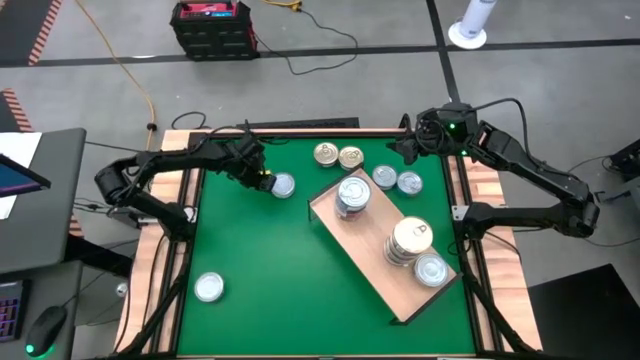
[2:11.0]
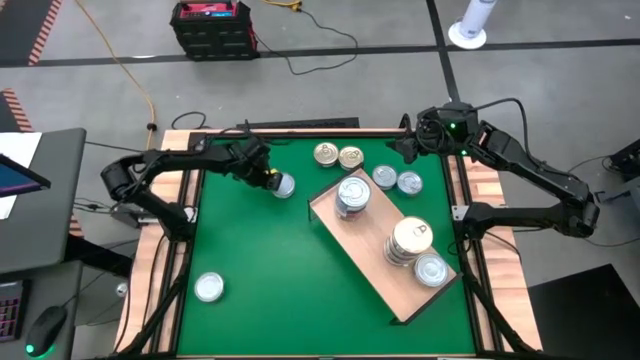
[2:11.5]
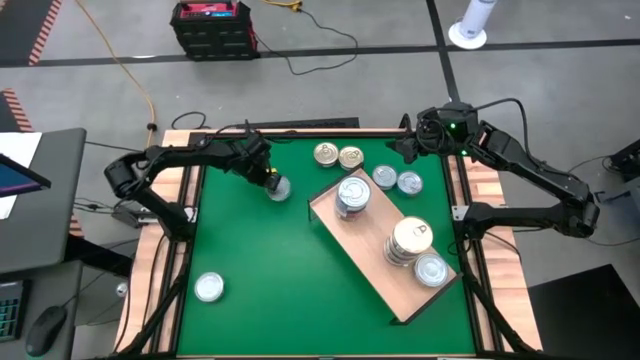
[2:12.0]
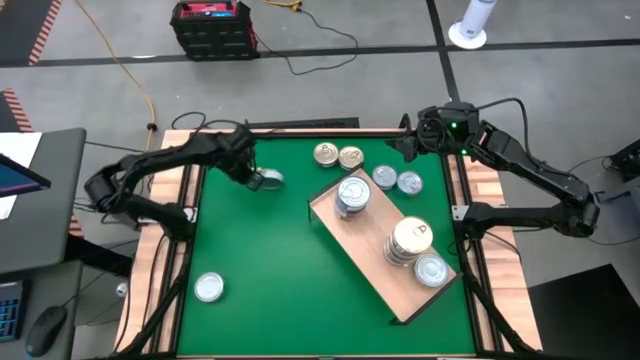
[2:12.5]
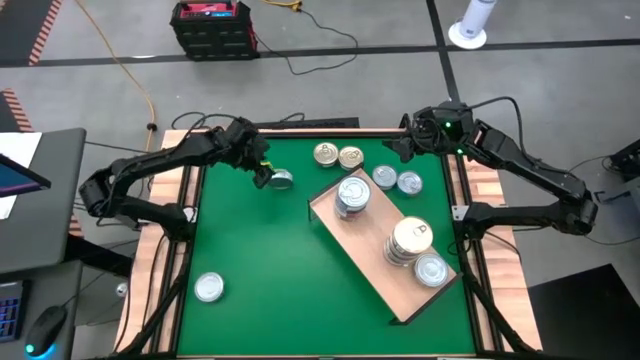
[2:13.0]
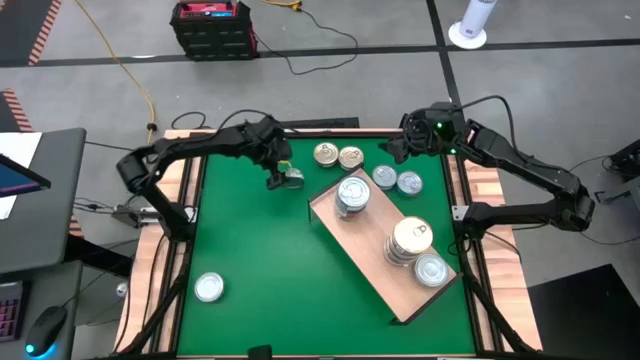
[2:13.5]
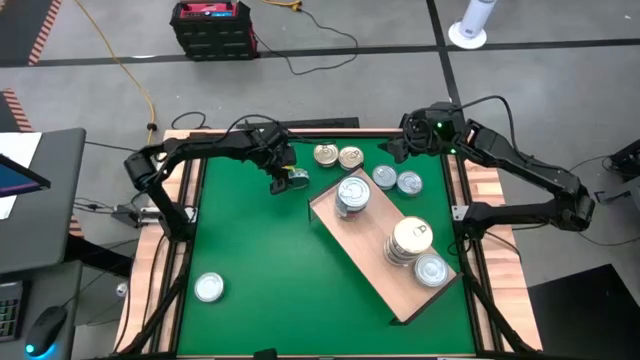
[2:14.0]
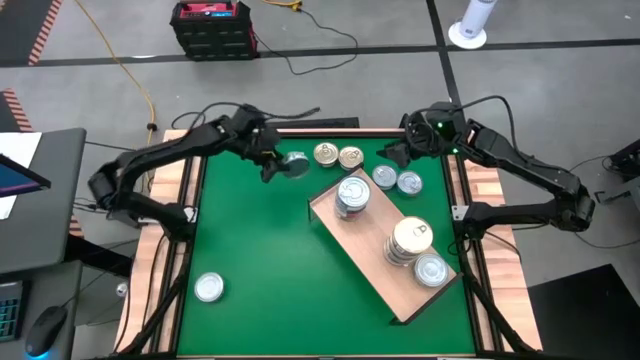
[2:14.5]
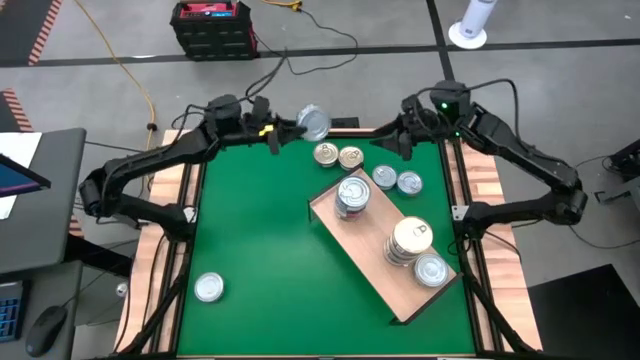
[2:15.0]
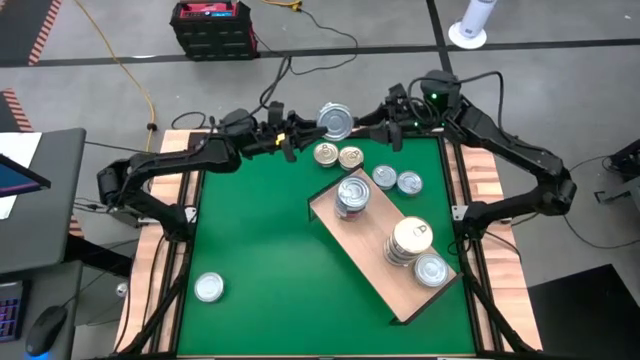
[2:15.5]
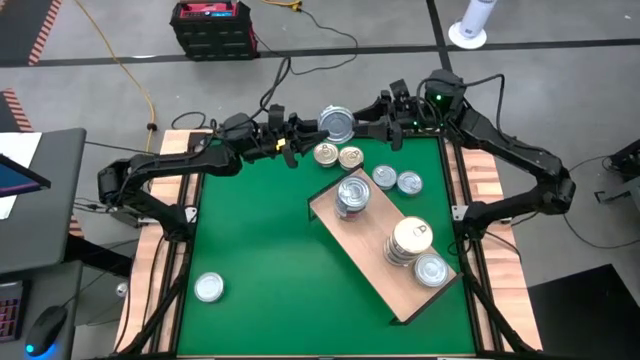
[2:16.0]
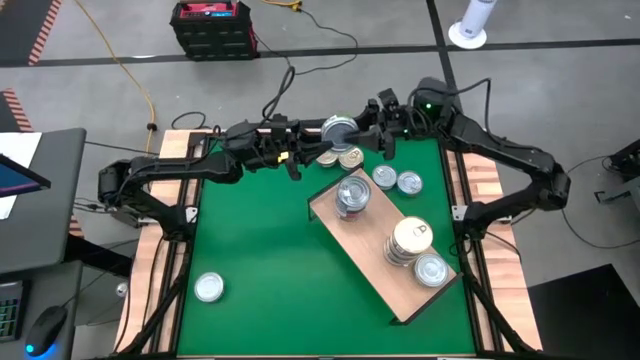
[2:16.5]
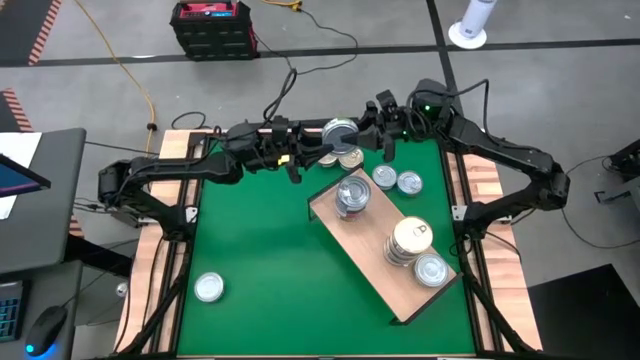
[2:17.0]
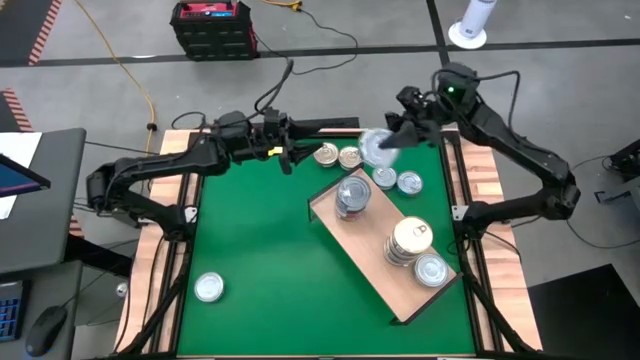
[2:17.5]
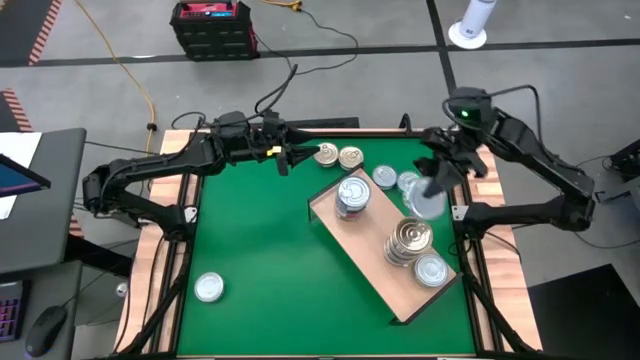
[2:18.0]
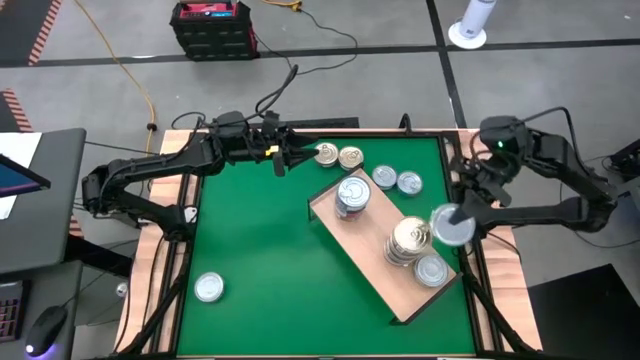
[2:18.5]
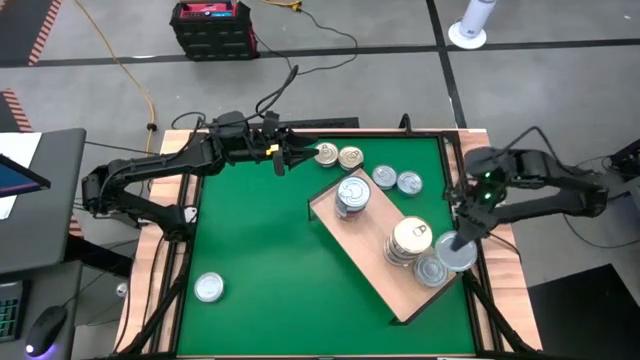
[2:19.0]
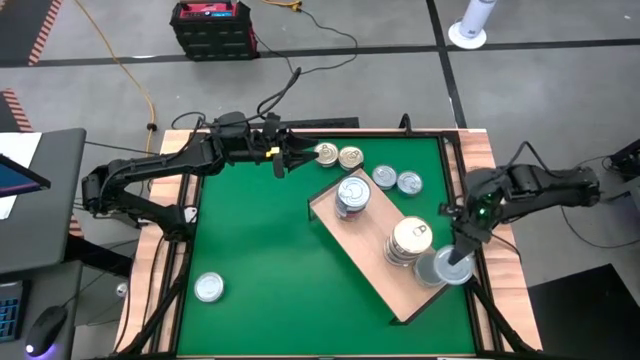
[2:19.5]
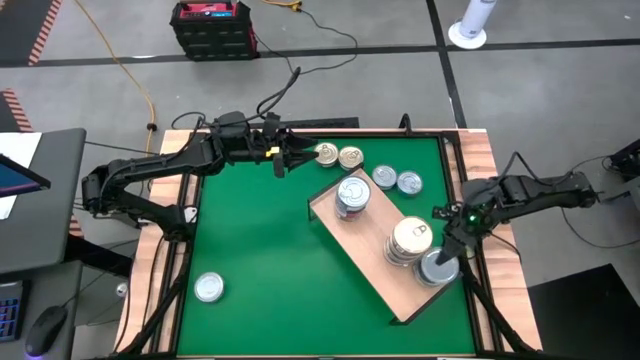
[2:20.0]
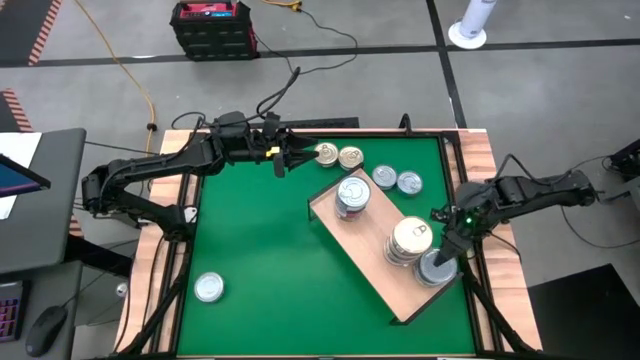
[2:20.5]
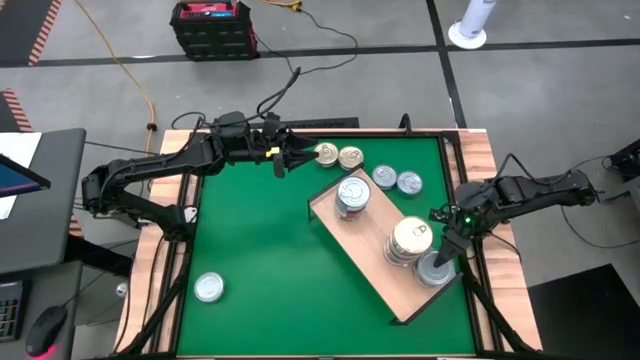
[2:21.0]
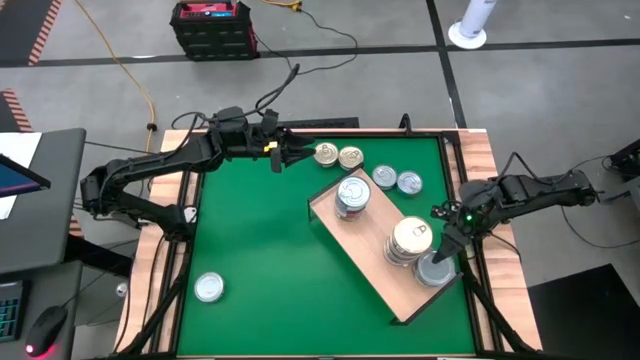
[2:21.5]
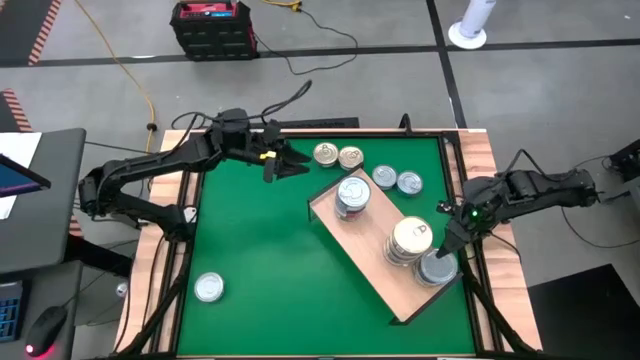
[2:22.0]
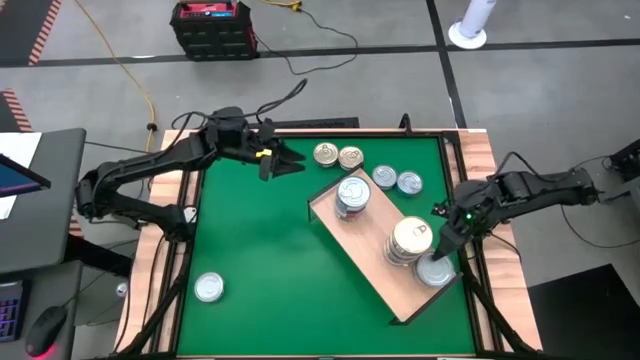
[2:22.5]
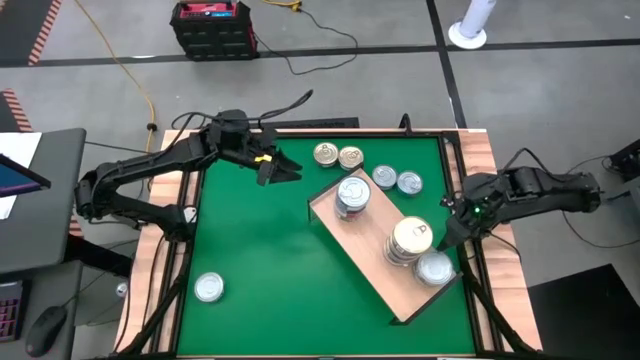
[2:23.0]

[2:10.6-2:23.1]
Task: Stack canned seafood by type on shelf
Stack the light green tuna can on top of the other light green tuna can on the shelf

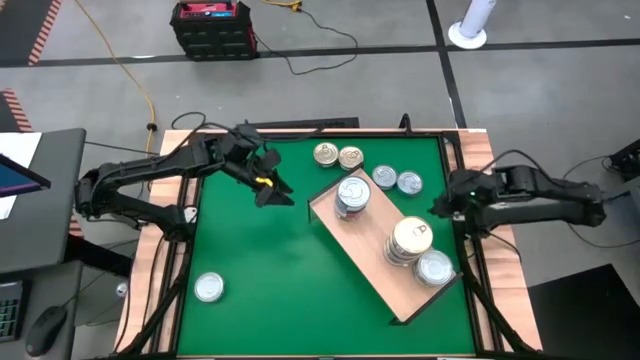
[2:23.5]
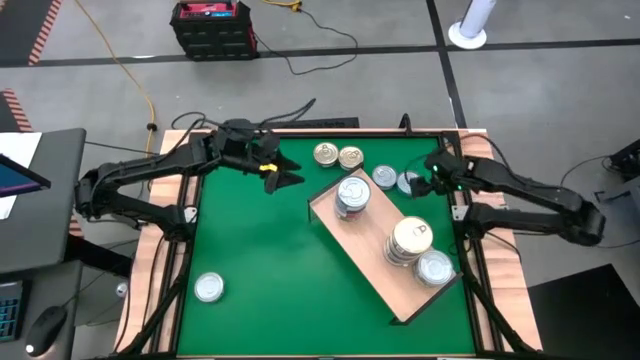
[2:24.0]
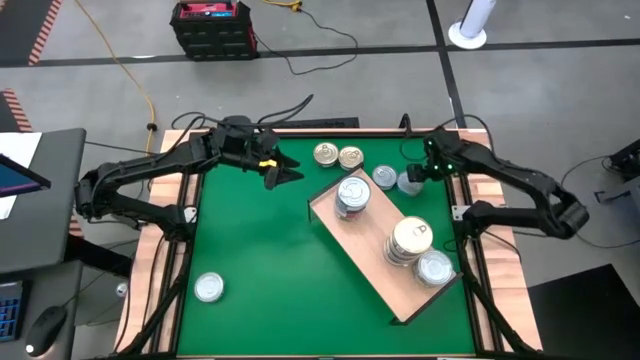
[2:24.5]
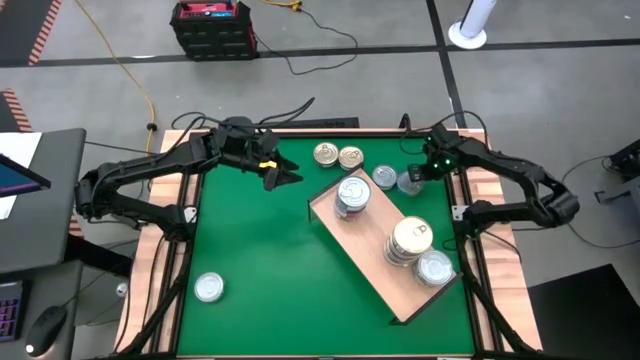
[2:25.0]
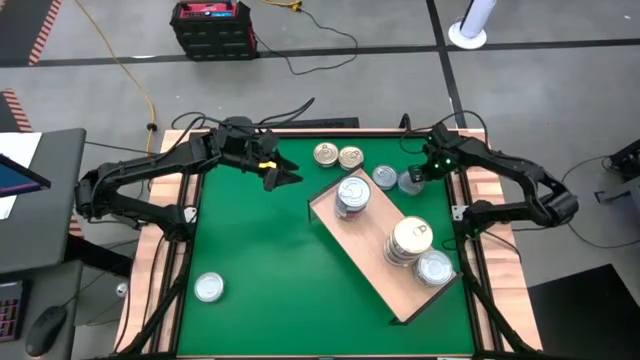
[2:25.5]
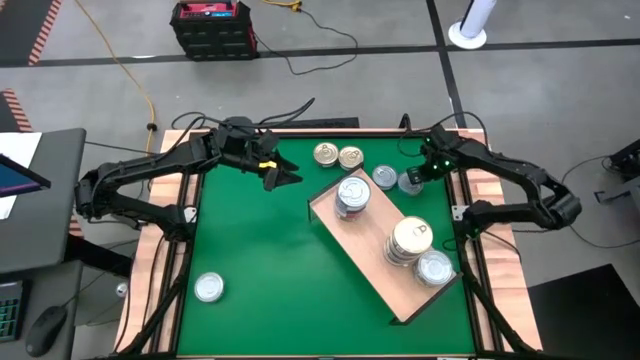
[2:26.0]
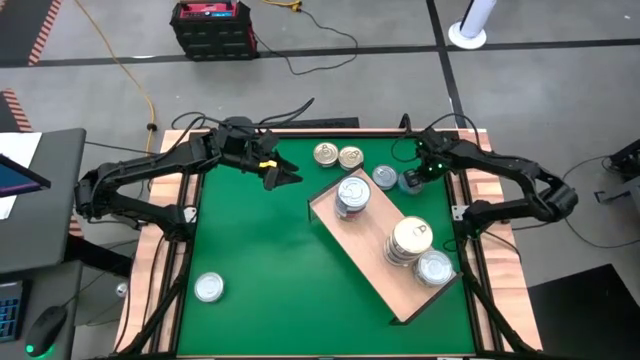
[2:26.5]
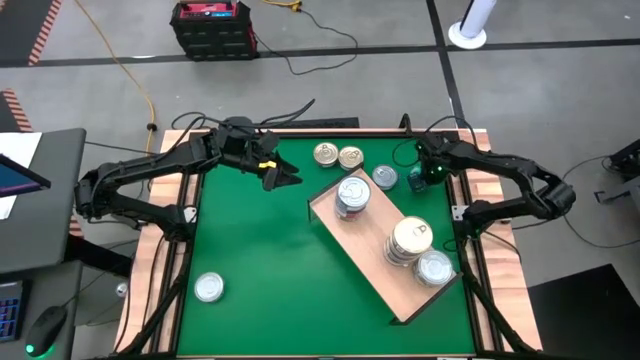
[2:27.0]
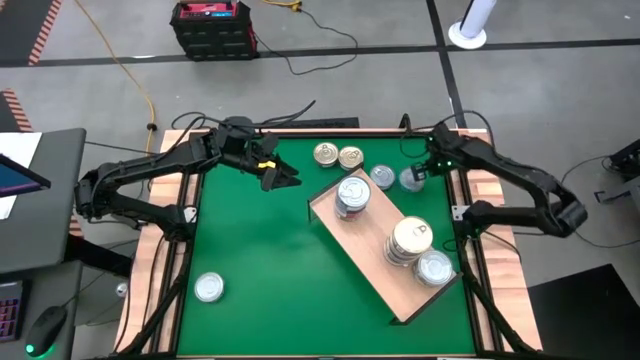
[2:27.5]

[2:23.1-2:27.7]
Stack the light blue tuna can on top of the blue tuna can on the shelf

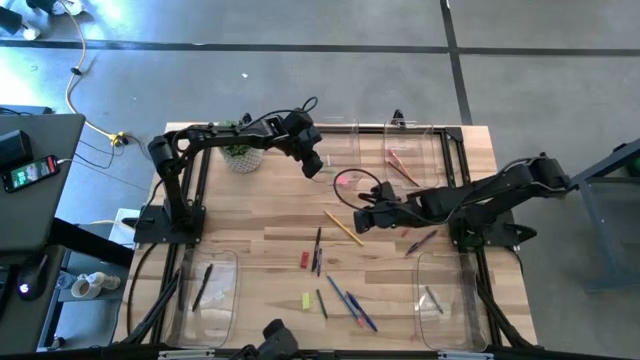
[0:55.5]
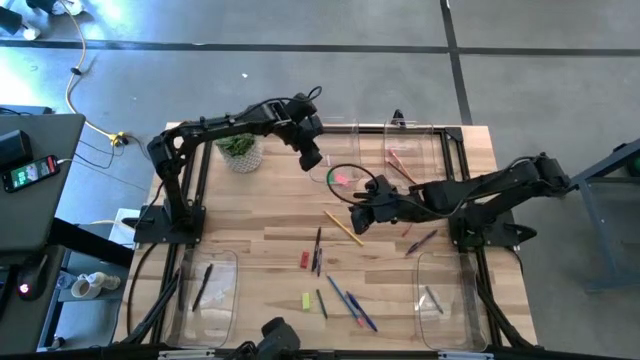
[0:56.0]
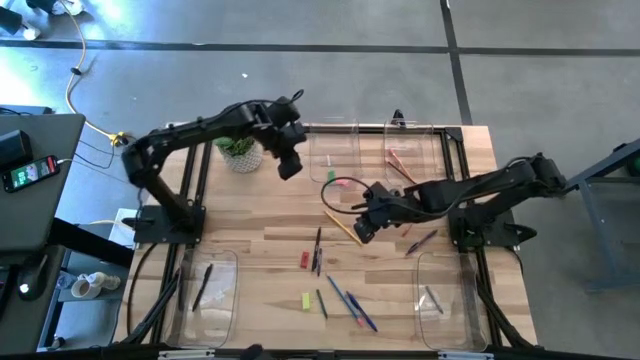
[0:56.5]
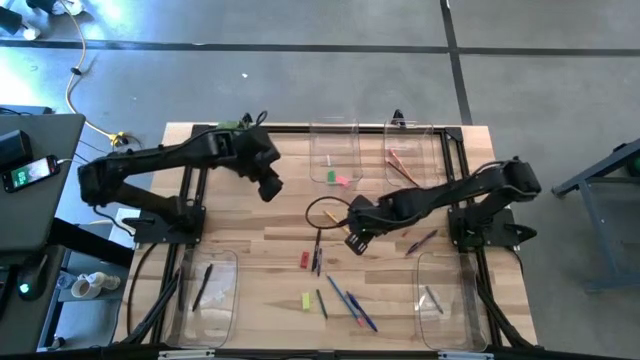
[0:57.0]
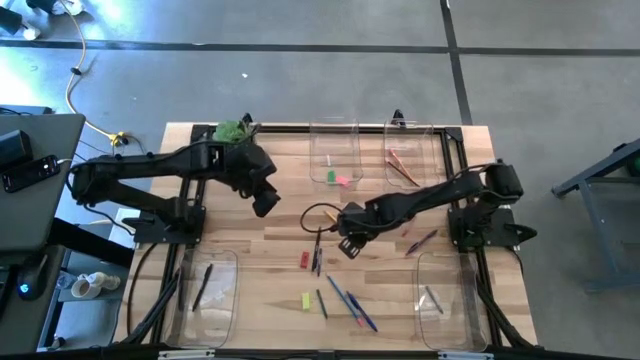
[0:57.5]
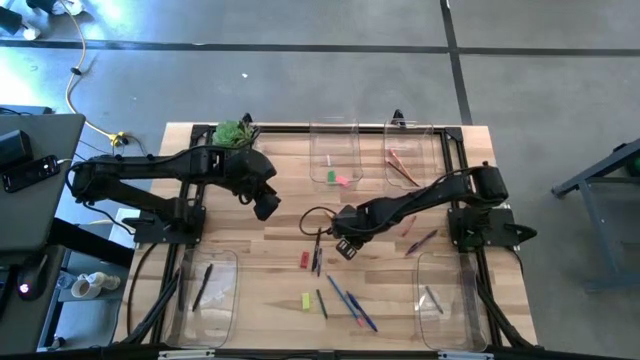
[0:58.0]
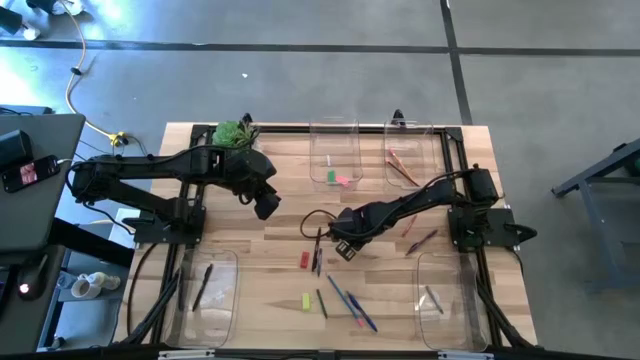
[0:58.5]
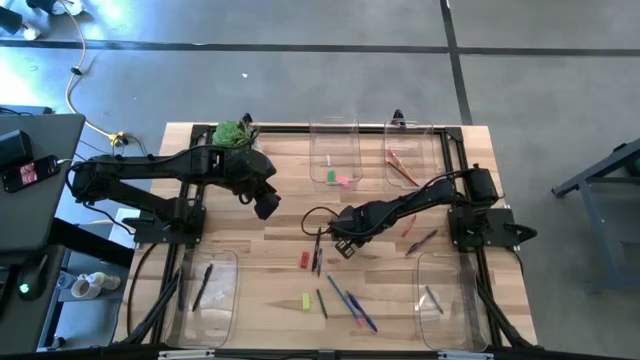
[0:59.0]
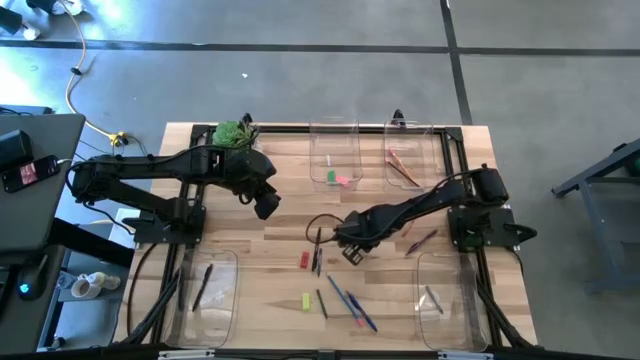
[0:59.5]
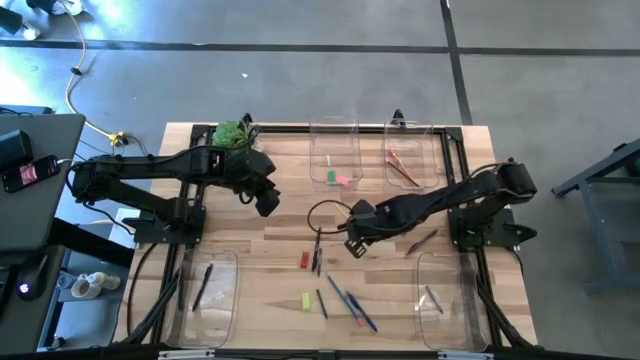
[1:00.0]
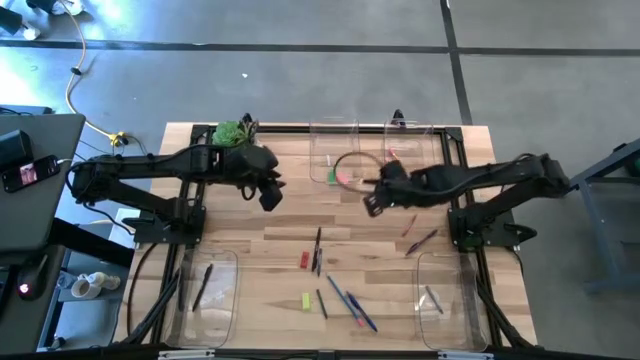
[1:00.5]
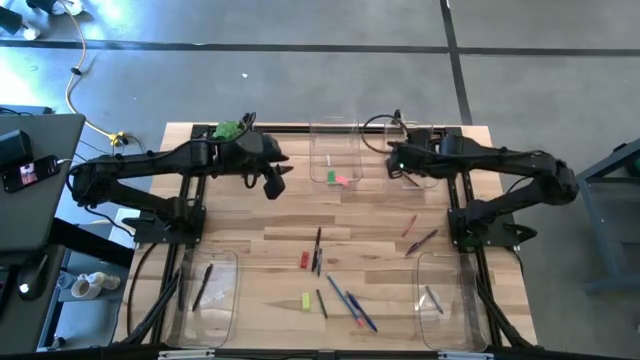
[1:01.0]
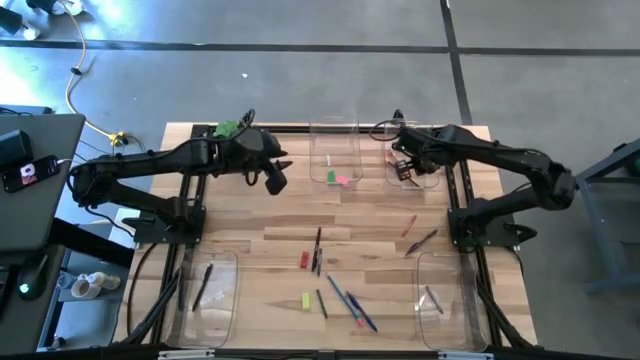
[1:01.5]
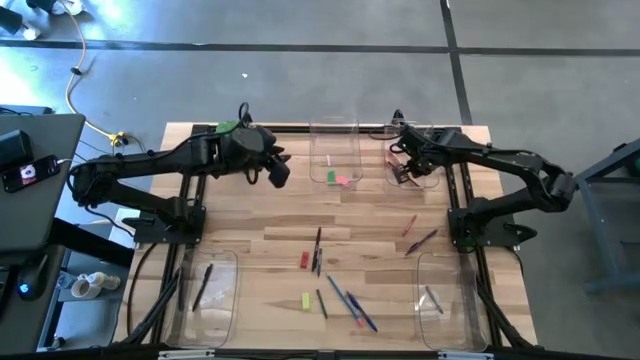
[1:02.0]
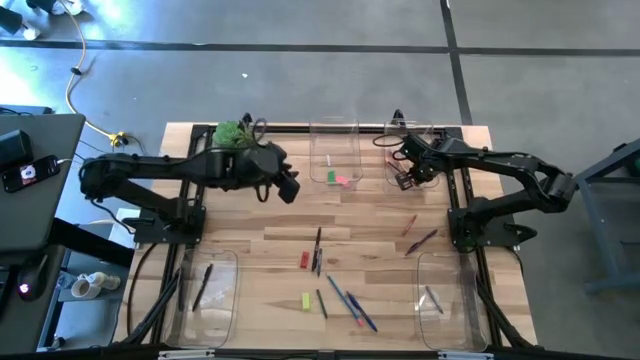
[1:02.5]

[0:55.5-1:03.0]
Task: Sort crayons/erasers/pens/pencils in bins
Put the yellow pencil into the top right transparent bin
